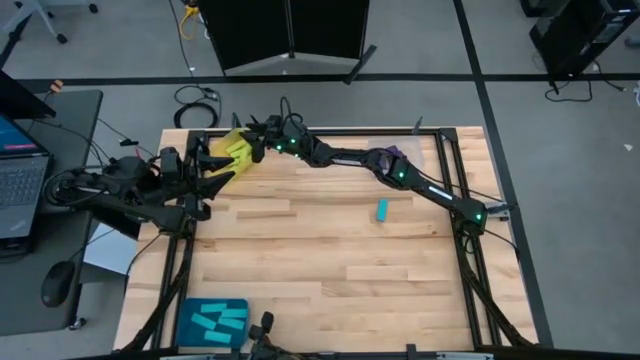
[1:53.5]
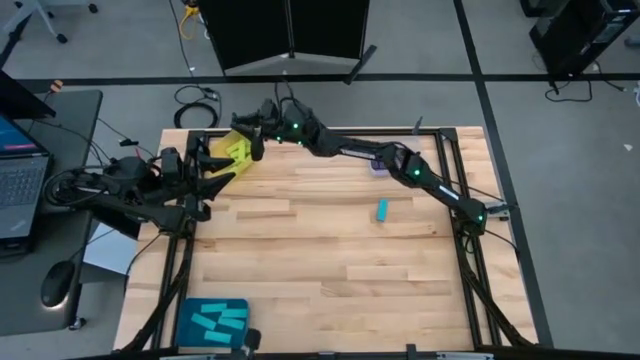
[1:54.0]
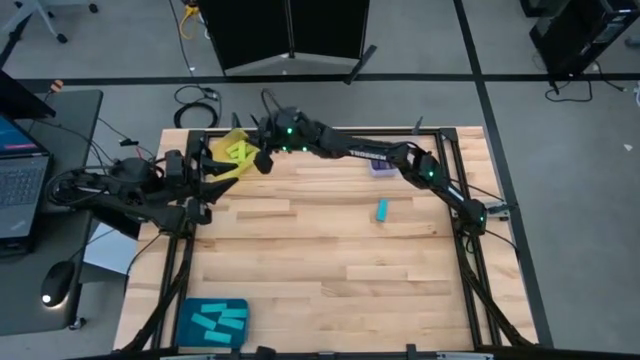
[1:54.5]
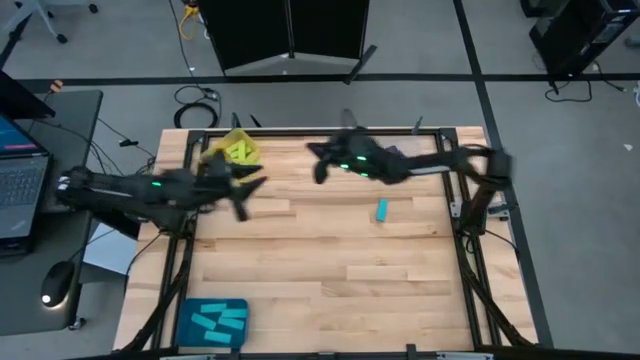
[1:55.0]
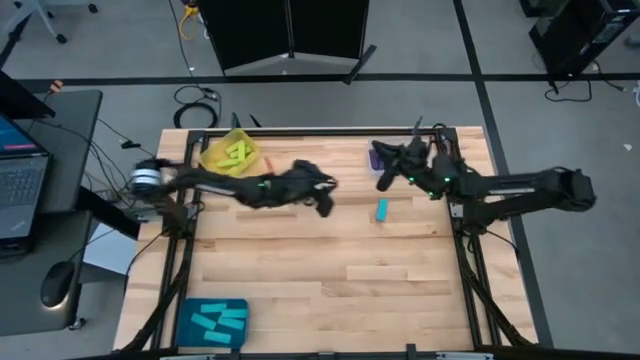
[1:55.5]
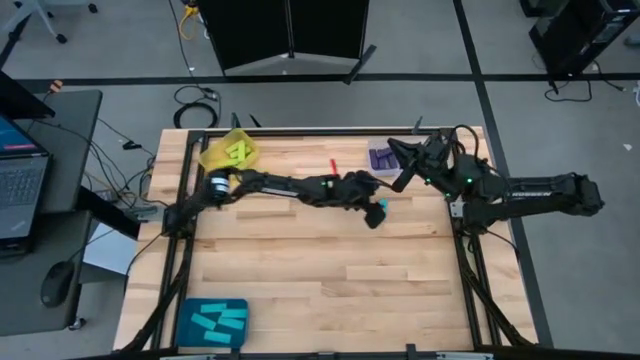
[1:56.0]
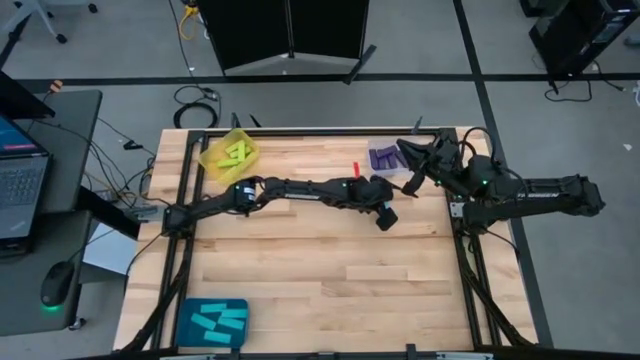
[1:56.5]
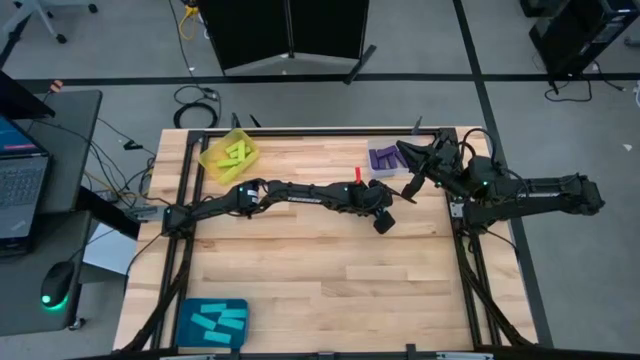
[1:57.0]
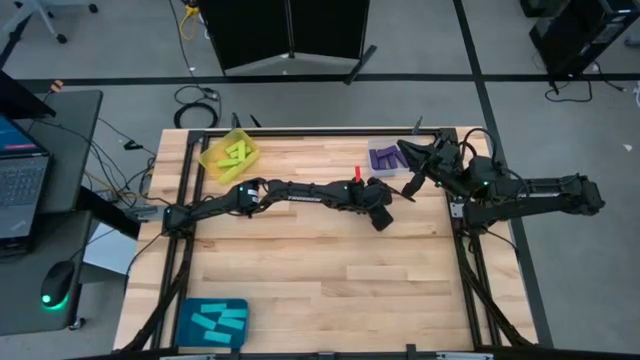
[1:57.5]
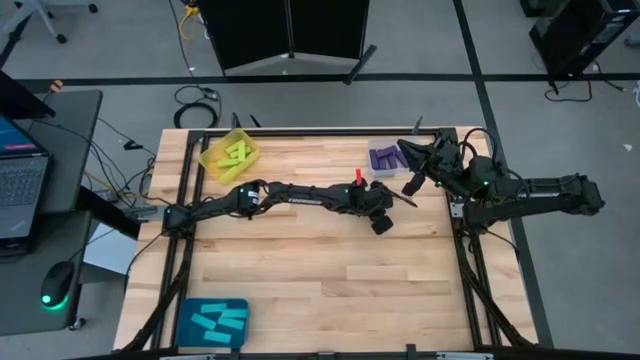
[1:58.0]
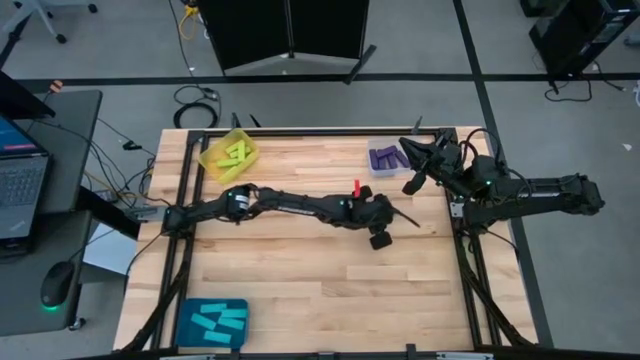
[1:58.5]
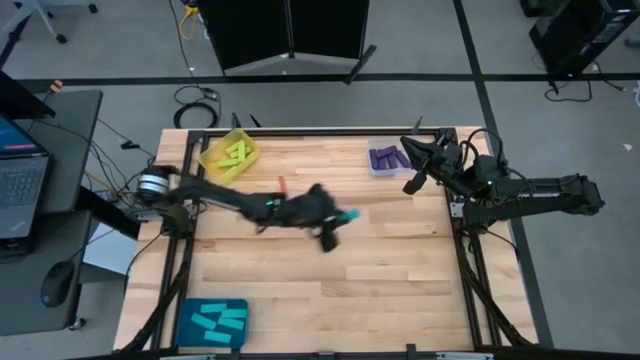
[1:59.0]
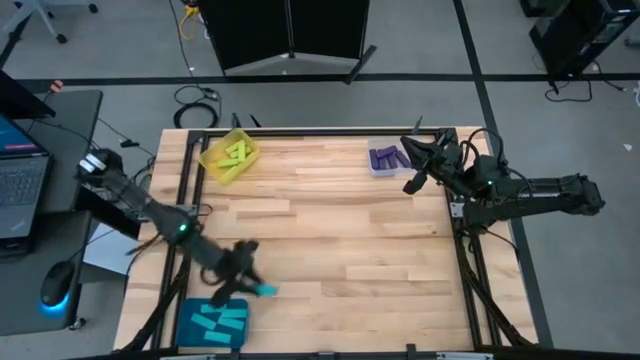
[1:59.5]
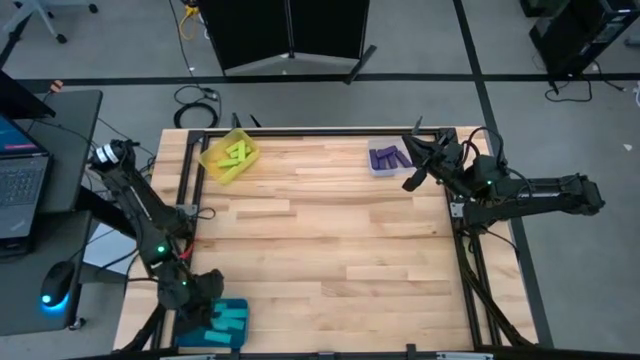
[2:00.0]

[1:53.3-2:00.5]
Task: Sort blocks
Put the light blue block into the blue bin

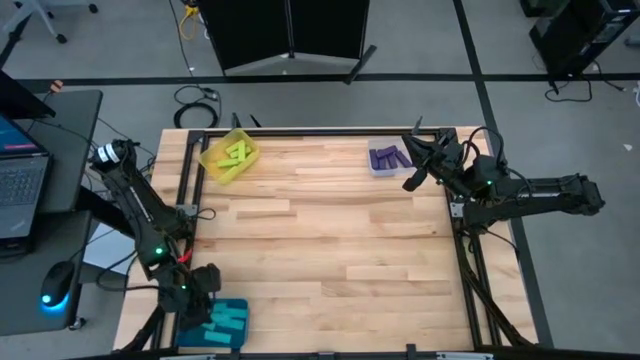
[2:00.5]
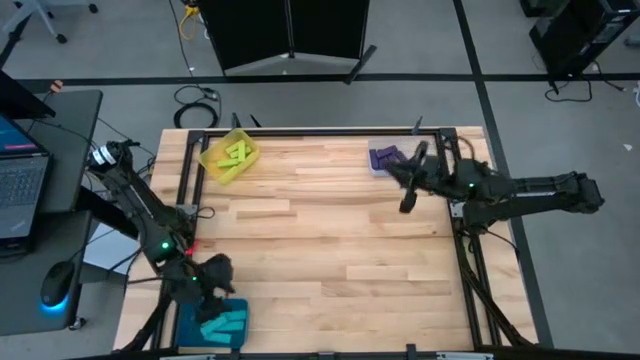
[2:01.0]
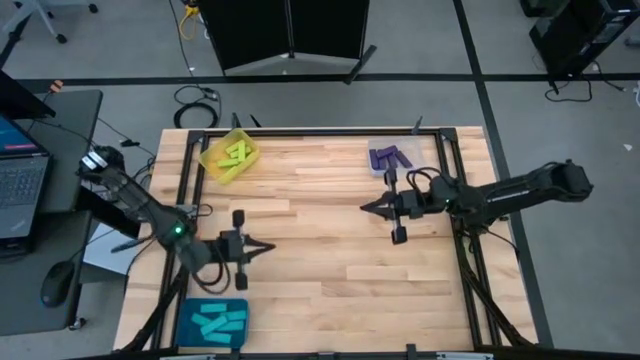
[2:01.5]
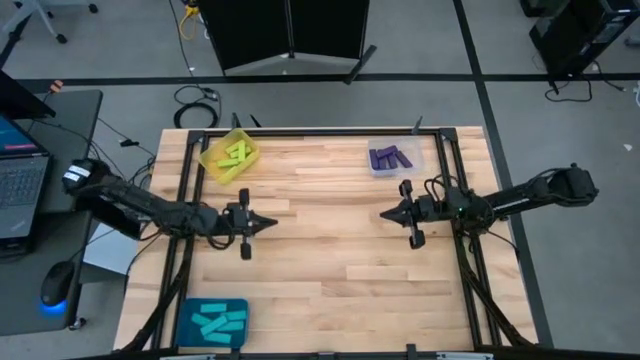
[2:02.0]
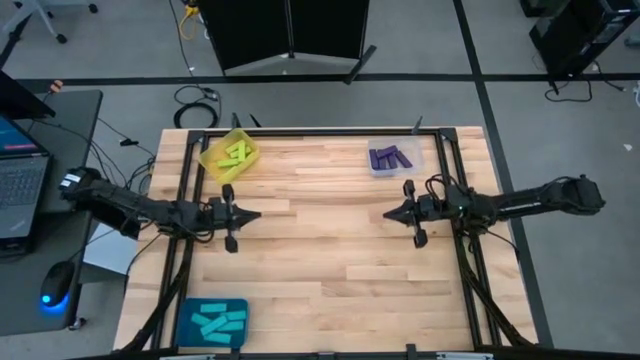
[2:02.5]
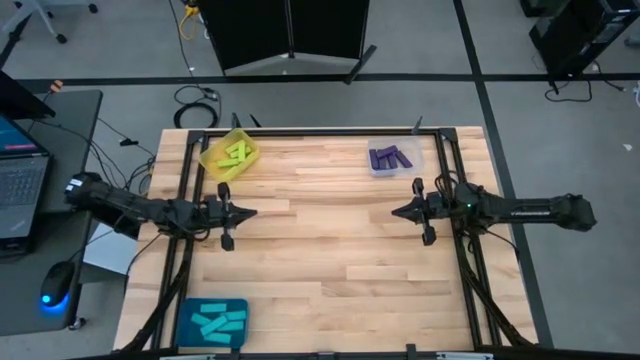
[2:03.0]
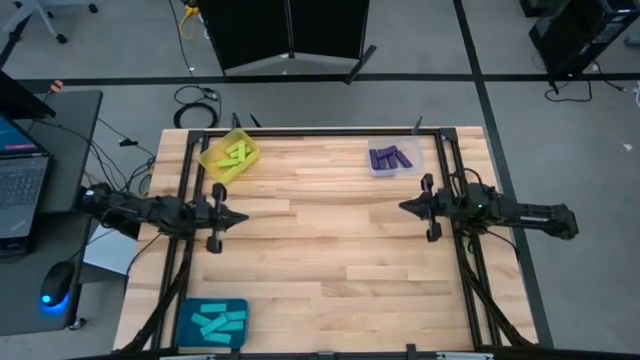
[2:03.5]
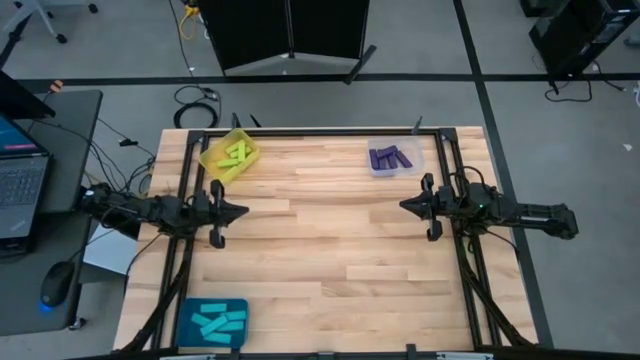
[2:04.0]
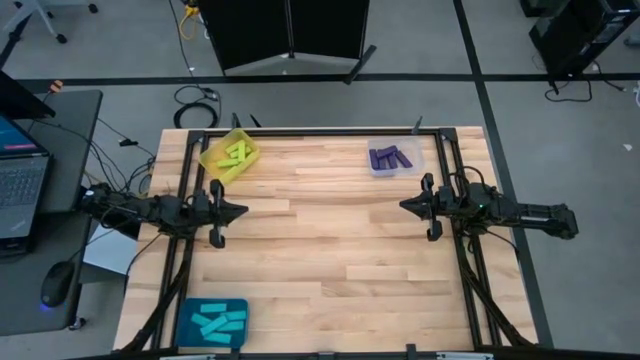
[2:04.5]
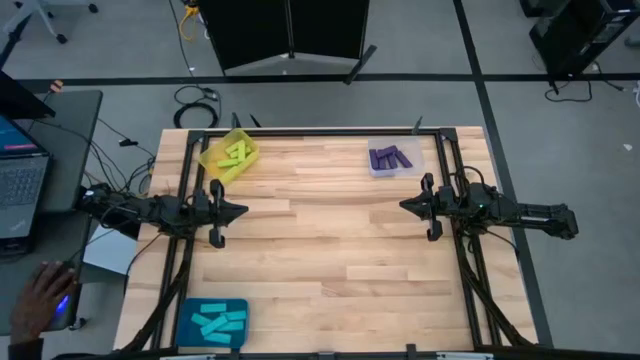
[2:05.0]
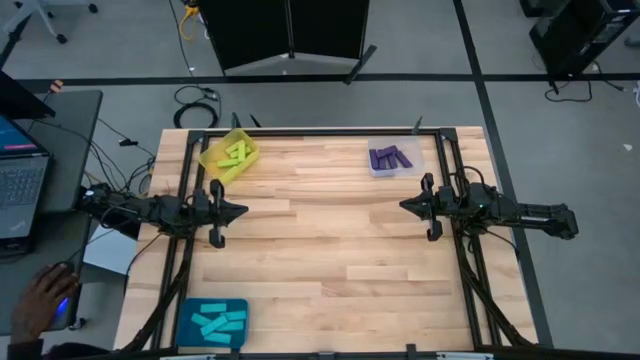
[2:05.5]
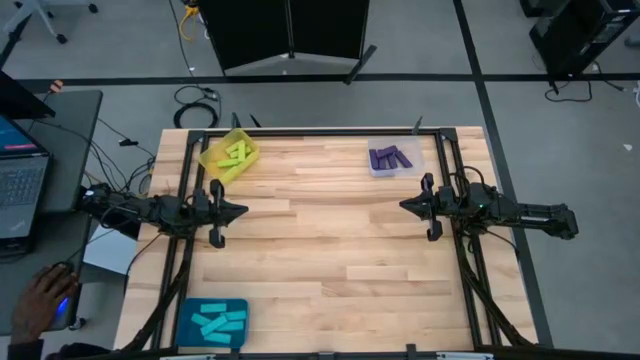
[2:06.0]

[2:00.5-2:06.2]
Return to Home Position

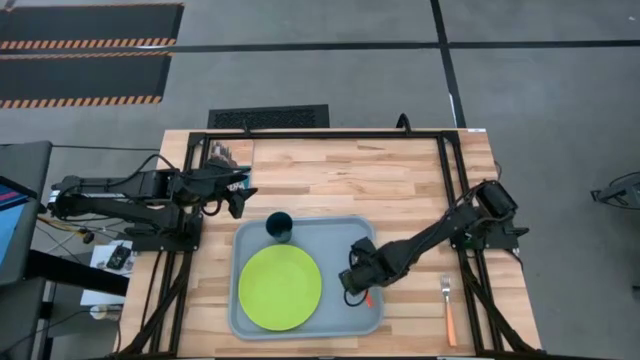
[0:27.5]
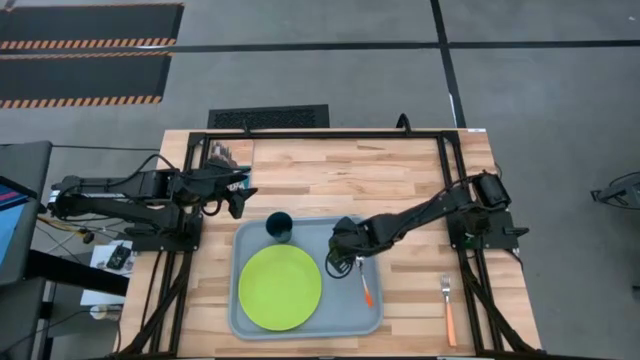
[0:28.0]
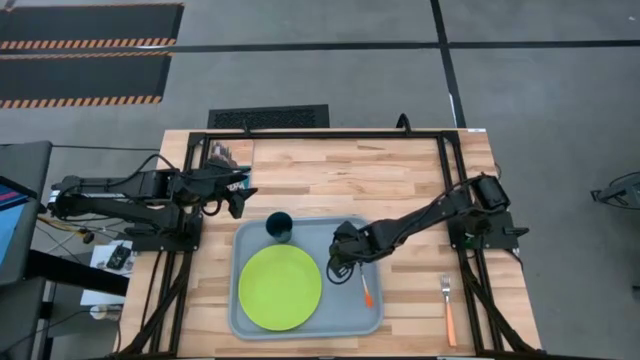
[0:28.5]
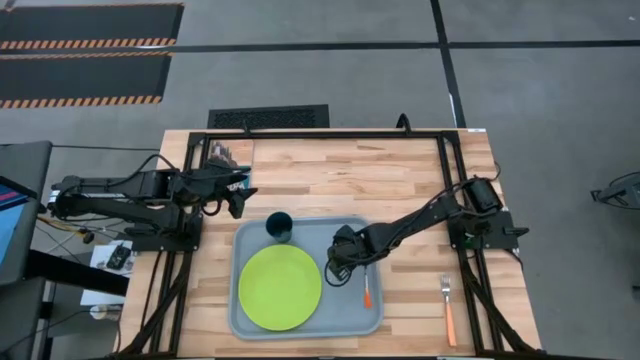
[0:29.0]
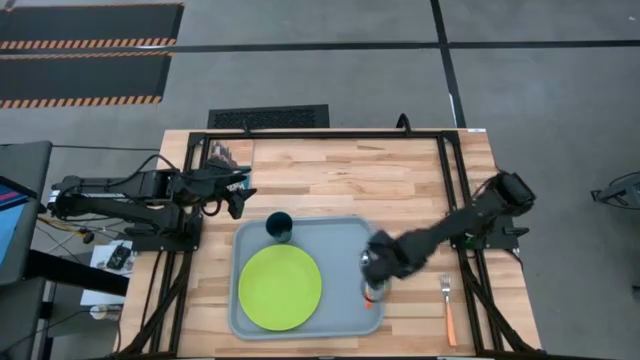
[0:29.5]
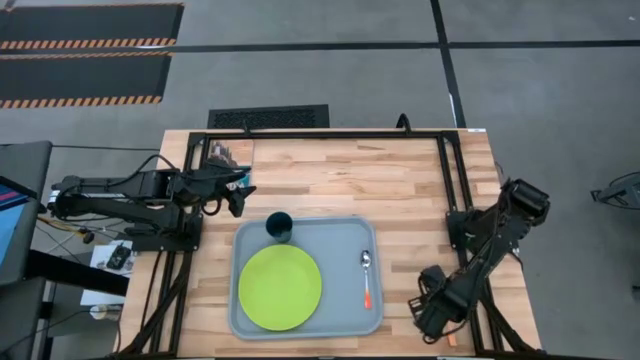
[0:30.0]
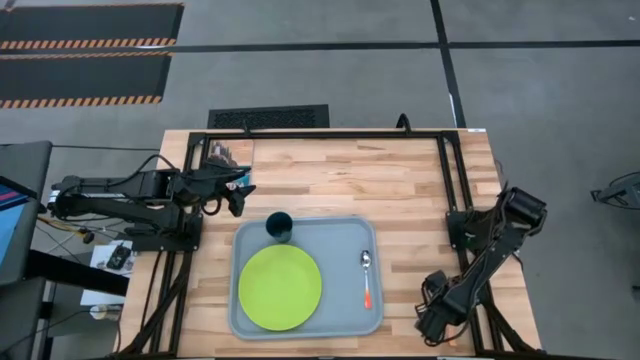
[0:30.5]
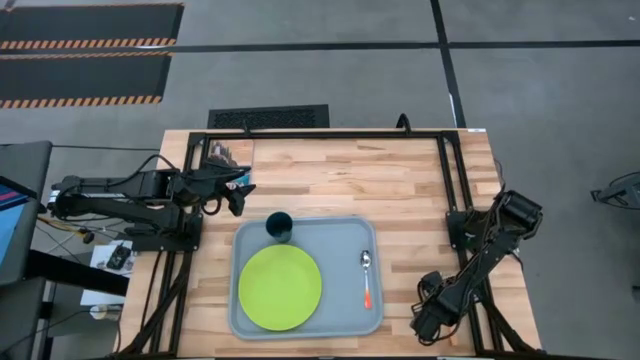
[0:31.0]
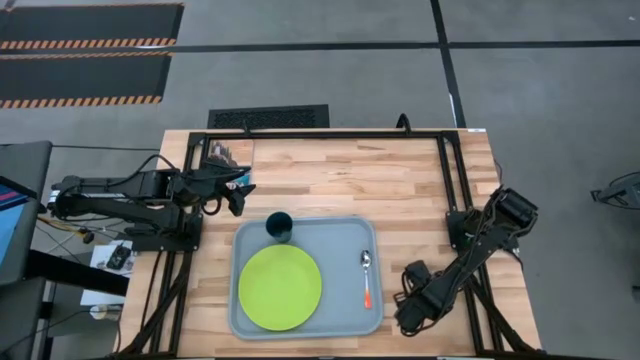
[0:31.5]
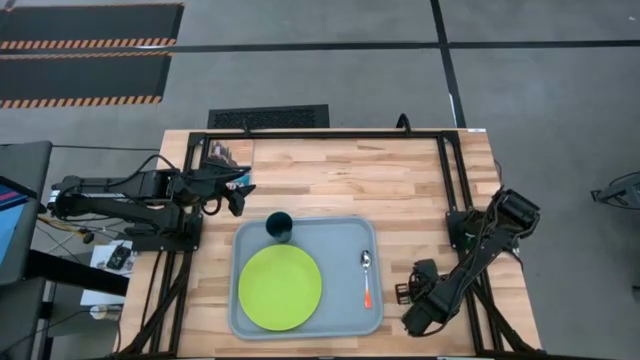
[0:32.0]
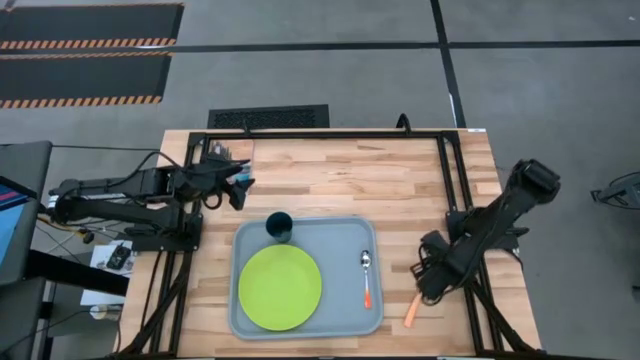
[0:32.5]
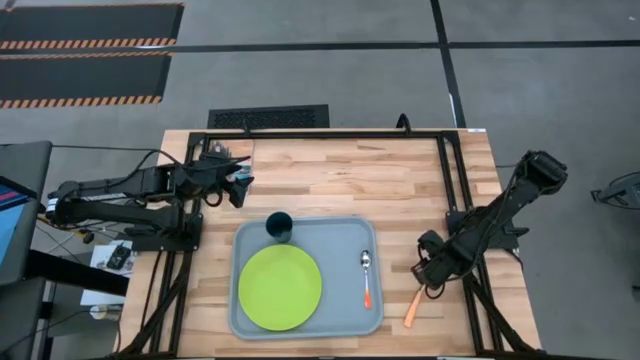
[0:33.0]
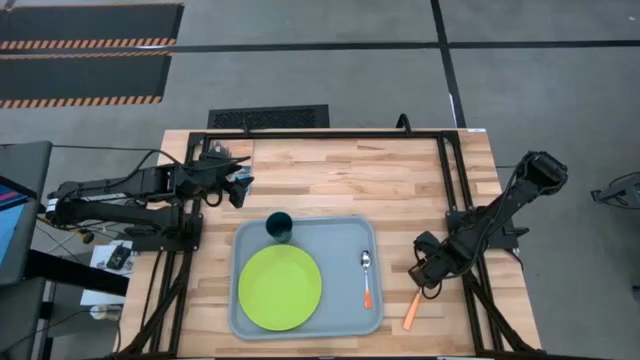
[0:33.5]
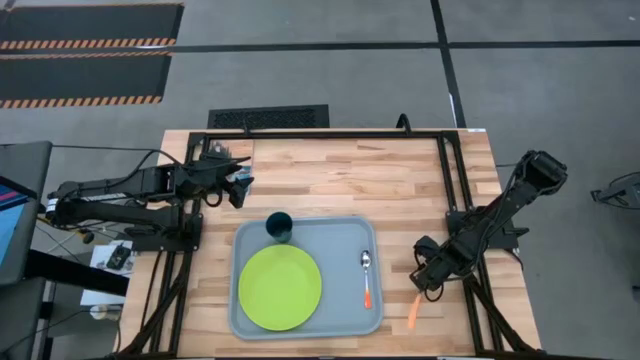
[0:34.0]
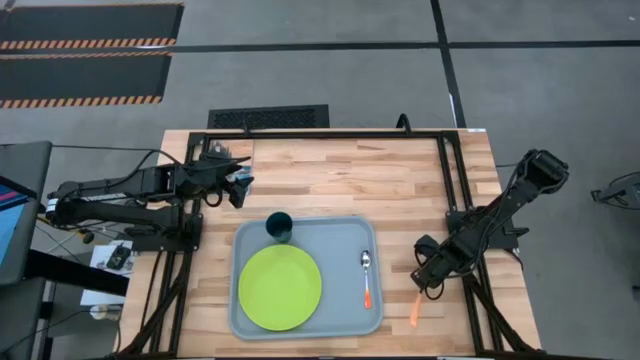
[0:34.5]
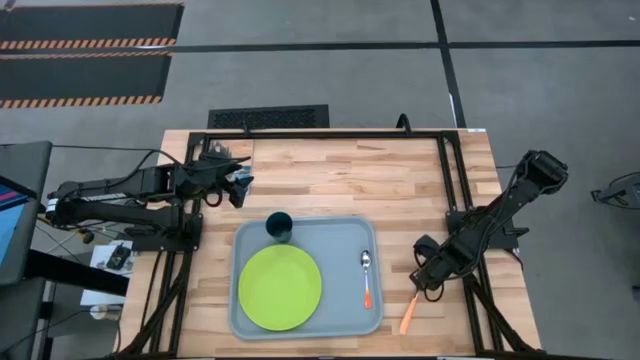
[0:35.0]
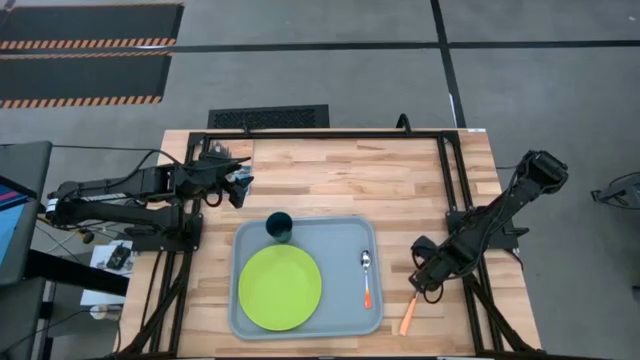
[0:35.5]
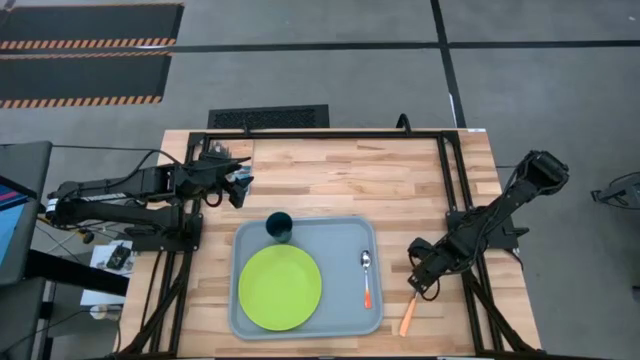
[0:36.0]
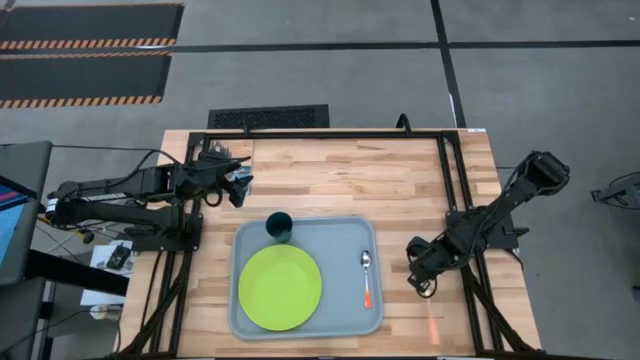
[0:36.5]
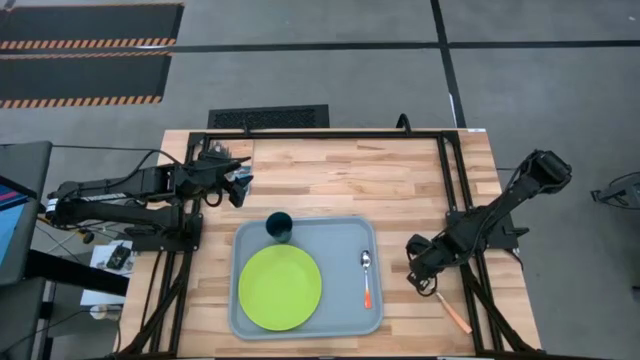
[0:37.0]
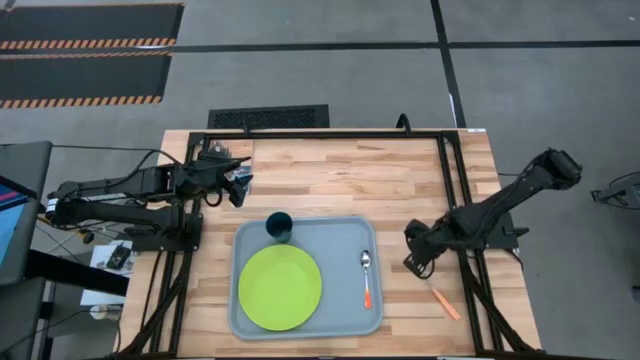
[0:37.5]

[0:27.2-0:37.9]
Task: Pick and place plate/cup/fork/spoon on tray
Put the orange fork on the gray serving tray to the left of the orange spoon
